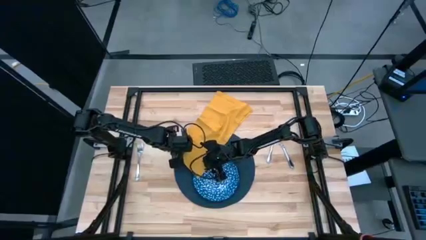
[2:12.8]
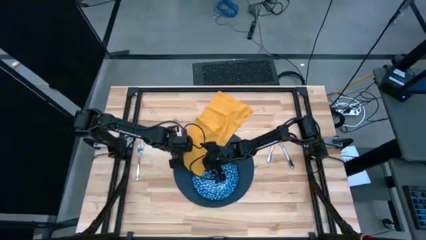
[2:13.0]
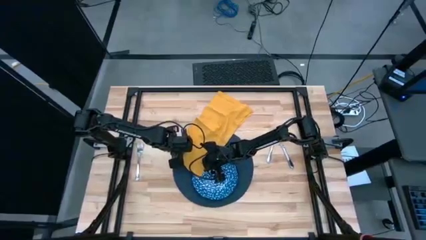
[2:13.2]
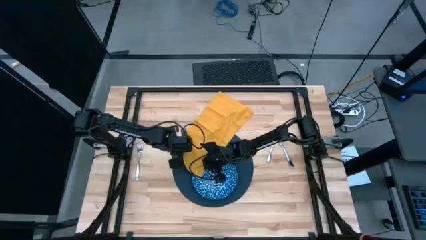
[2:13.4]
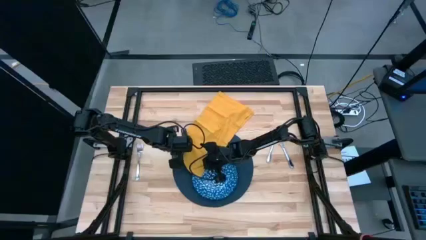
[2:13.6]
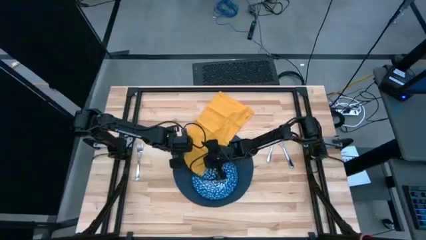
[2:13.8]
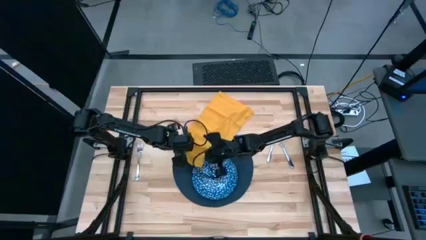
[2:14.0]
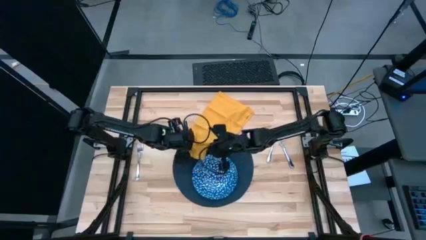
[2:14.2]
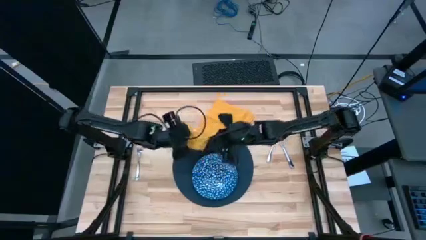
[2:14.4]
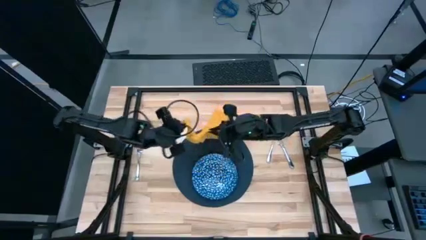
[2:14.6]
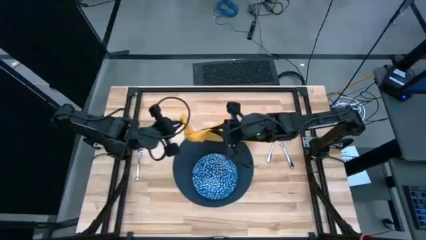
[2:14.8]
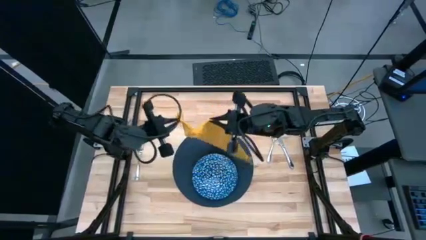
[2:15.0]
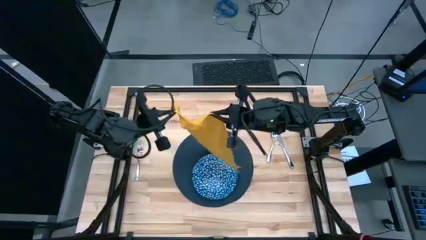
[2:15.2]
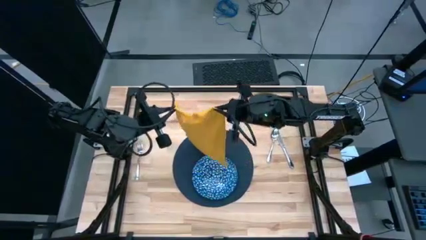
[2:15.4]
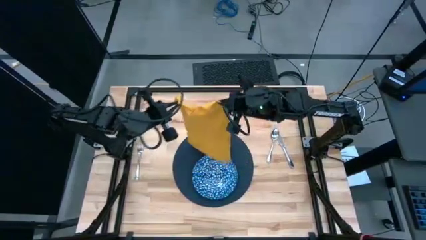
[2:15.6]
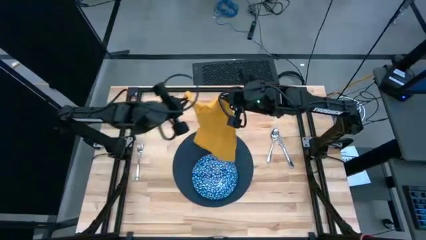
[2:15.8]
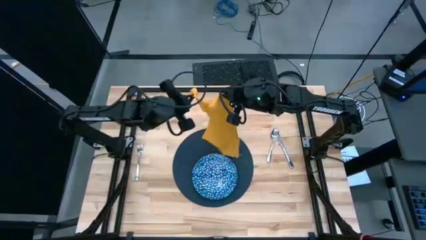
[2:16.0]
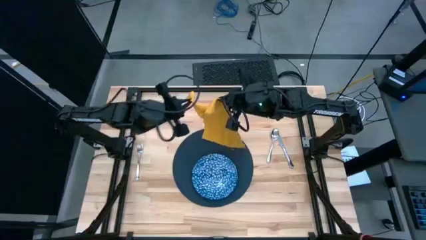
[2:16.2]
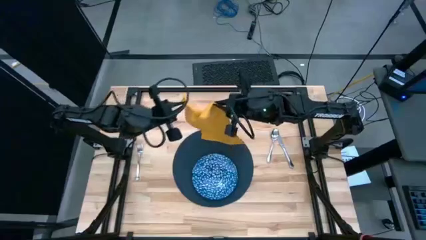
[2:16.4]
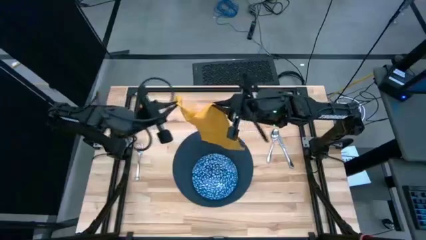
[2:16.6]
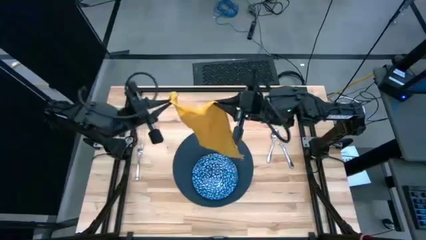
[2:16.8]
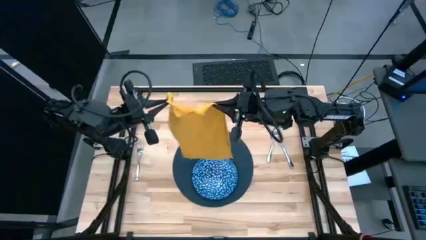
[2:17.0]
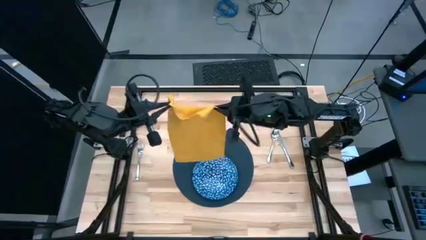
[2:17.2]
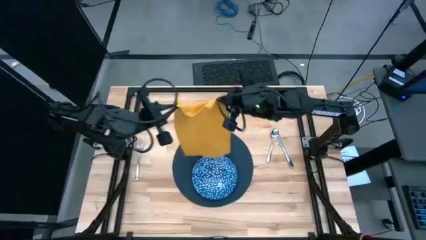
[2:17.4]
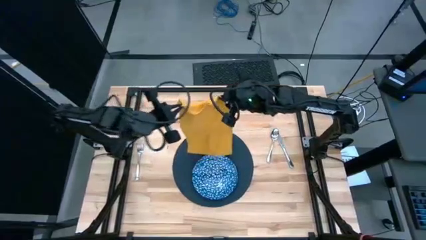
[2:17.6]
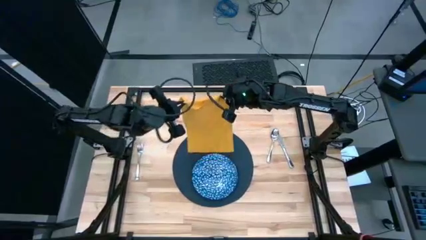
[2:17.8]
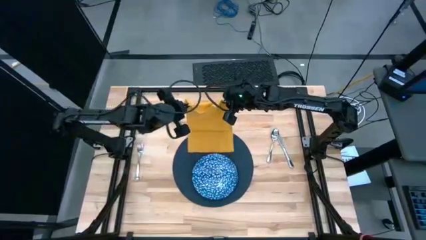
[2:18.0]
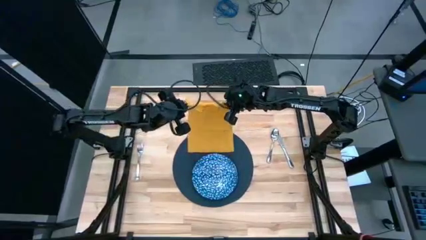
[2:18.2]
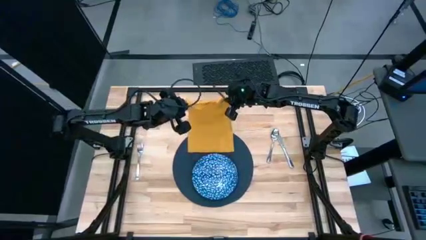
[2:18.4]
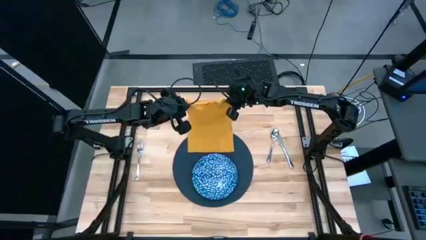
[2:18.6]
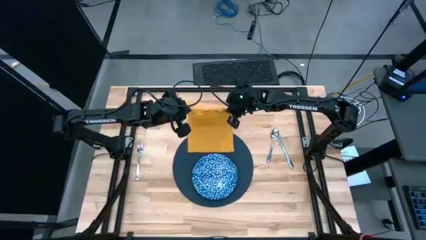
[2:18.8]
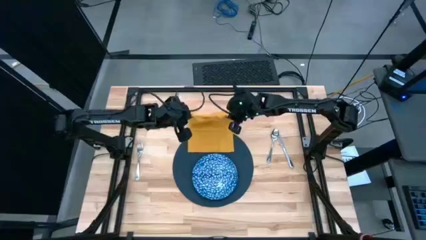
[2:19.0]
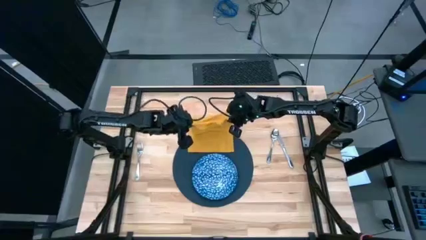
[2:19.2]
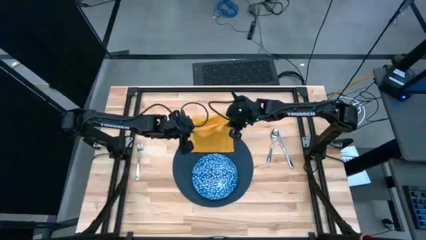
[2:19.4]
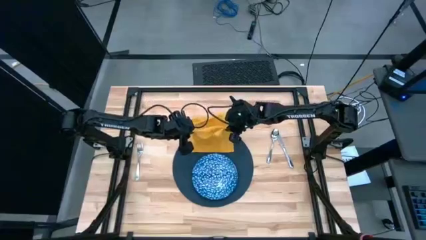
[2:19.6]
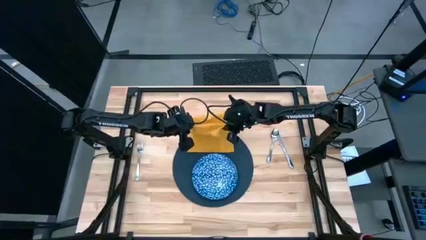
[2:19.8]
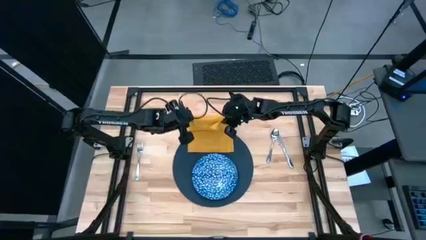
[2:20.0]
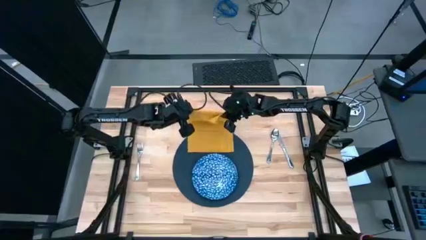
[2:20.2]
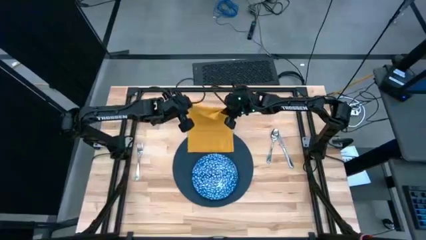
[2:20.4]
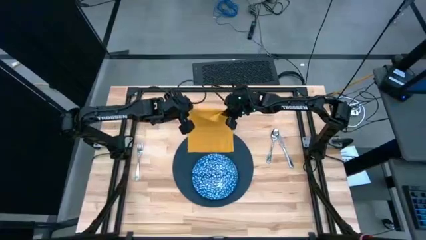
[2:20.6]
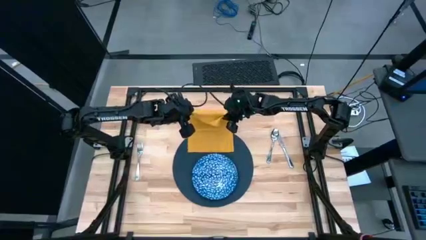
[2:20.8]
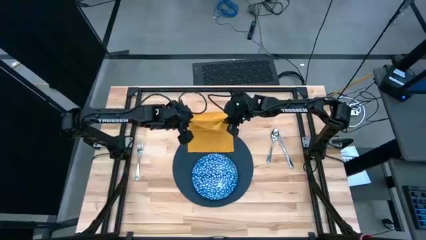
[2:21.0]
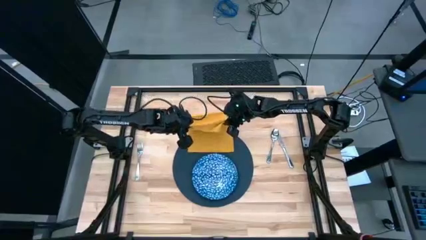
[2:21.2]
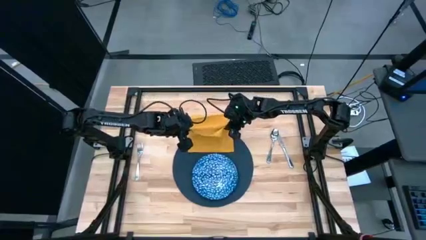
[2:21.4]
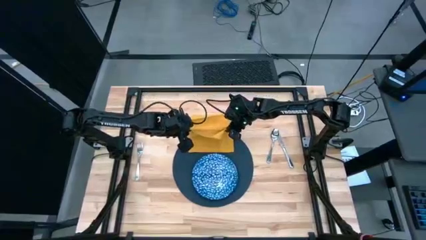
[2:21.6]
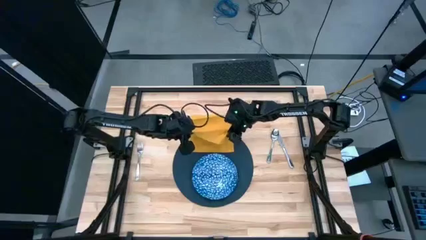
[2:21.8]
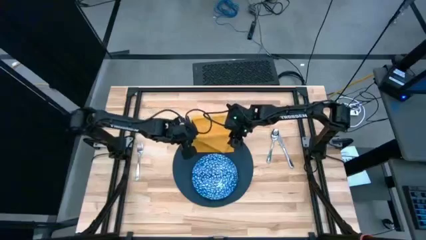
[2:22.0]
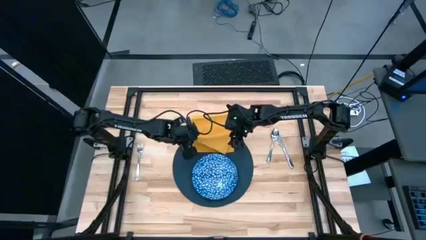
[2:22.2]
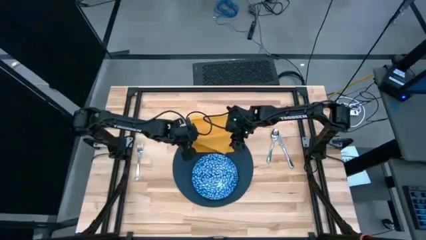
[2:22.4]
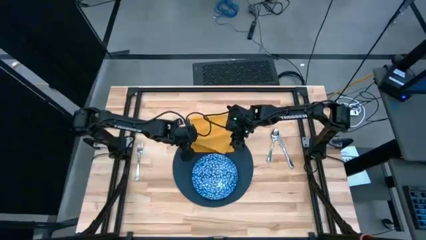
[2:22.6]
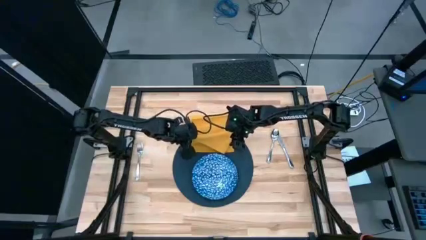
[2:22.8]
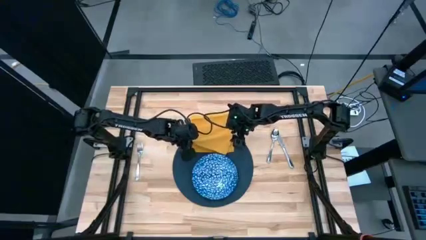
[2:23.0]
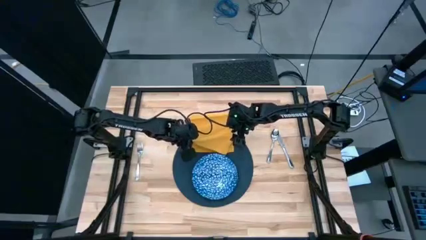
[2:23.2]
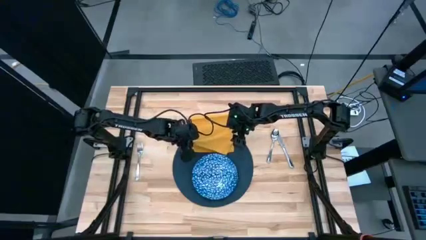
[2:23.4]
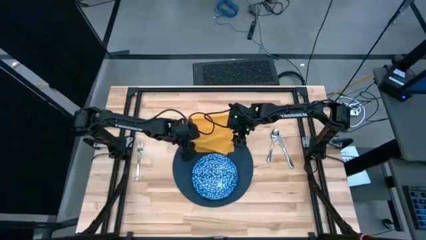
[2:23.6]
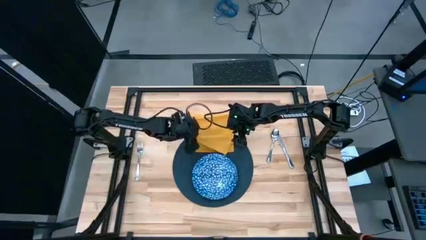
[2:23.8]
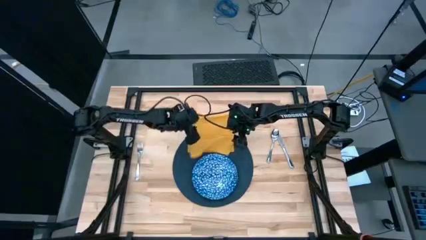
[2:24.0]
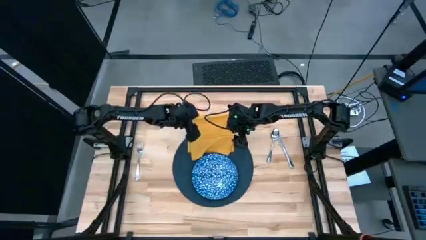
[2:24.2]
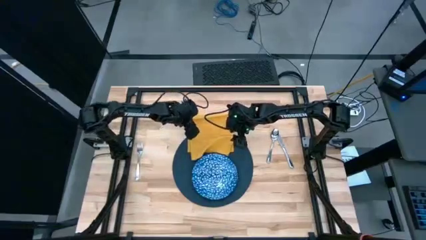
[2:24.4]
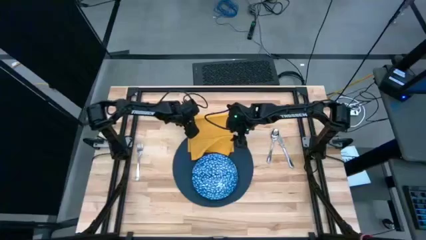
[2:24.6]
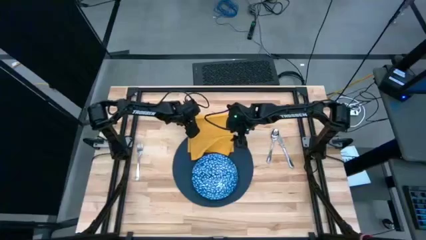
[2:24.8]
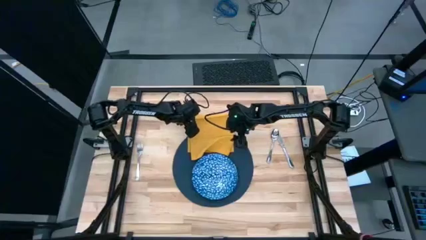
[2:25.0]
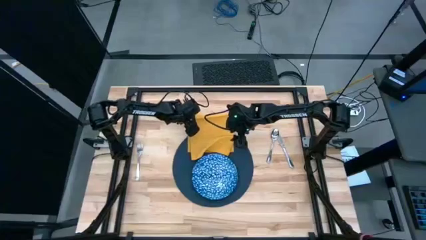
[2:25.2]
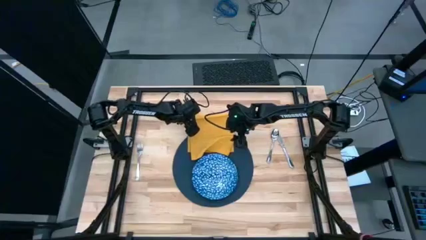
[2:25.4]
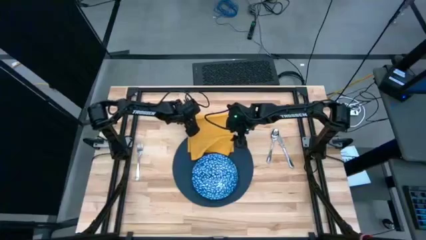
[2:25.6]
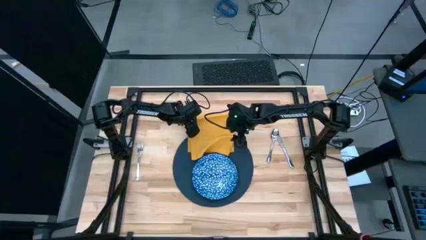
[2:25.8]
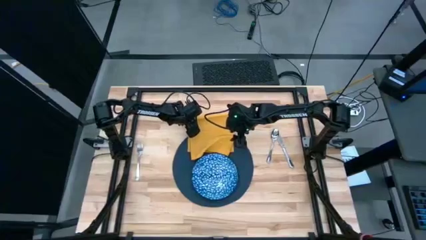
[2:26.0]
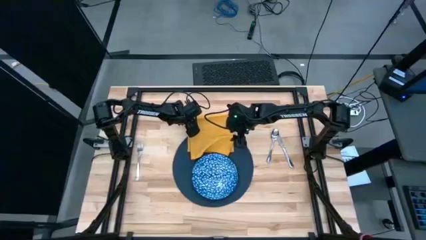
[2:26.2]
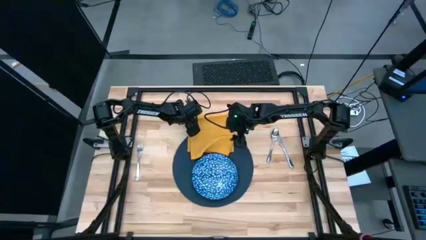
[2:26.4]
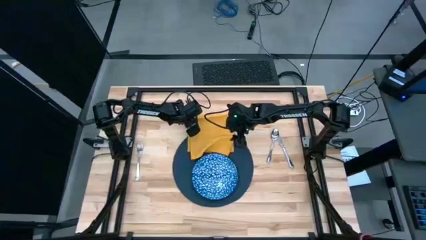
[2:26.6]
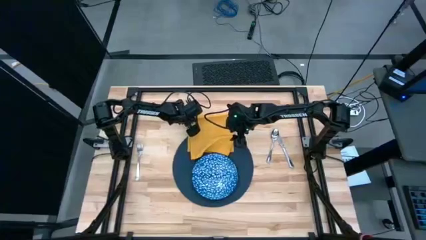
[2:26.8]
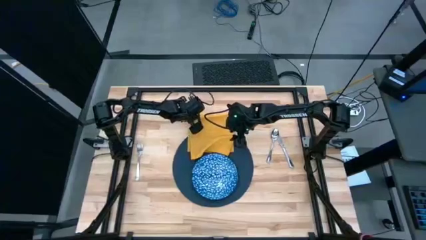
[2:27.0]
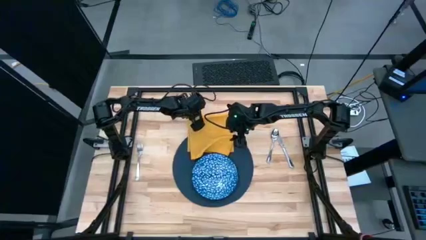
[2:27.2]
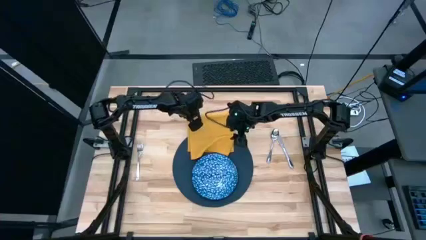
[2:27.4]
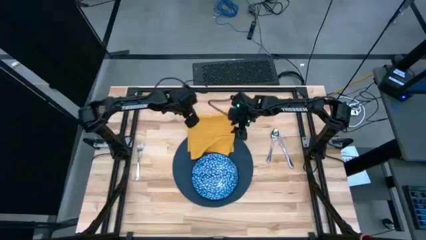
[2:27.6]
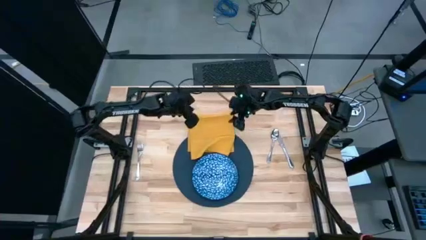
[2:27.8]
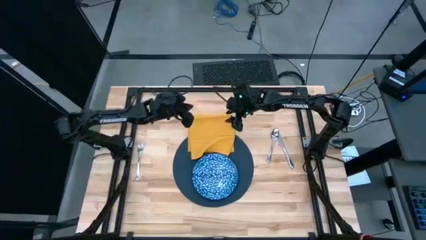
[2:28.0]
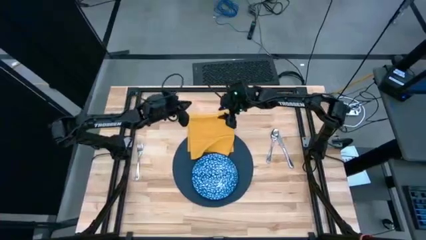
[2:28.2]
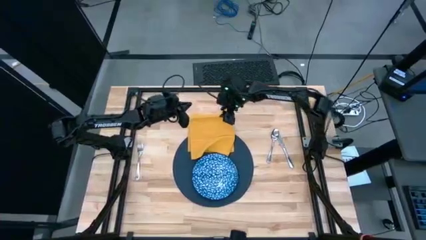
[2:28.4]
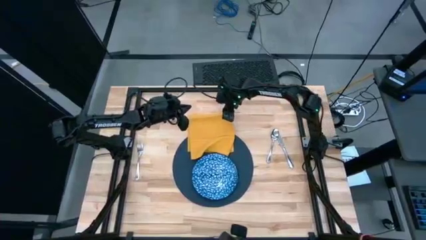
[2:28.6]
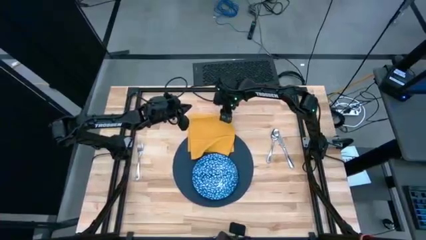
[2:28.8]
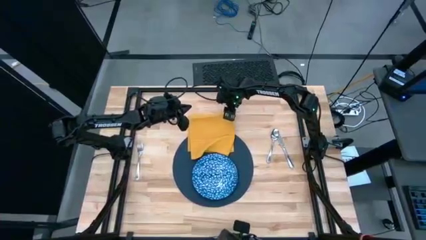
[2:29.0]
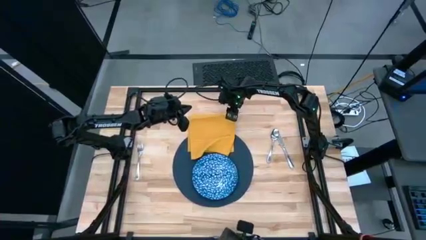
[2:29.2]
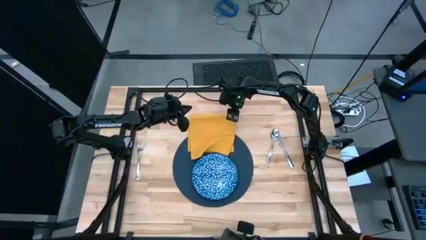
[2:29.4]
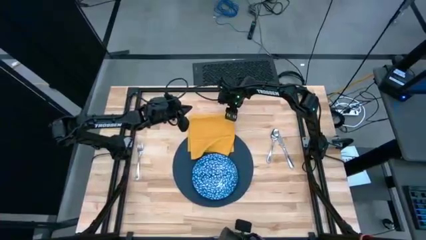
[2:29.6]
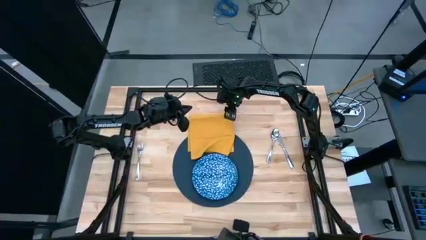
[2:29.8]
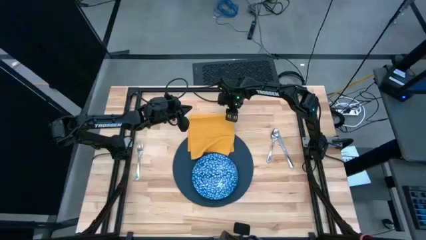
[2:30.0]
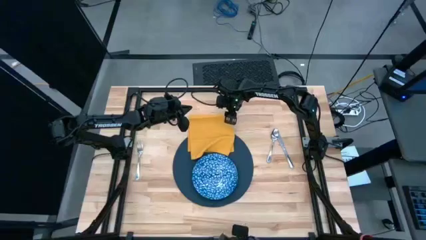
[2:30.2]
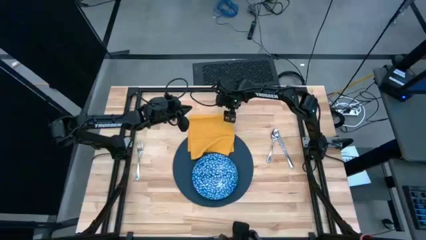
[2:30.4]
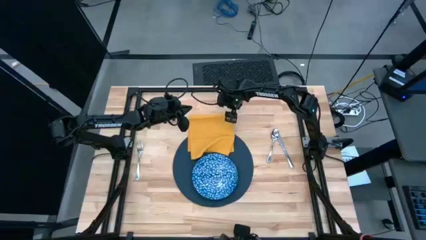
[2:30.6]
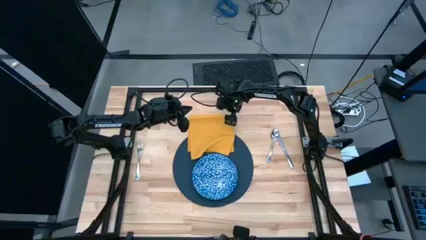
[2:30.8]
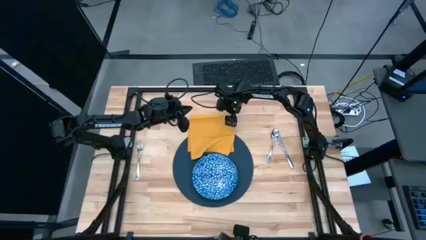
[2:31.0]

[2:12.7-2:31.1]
Task: Set table place
Fold the yellow table napkin
